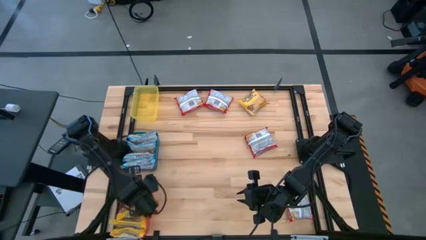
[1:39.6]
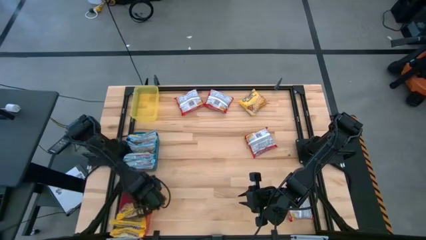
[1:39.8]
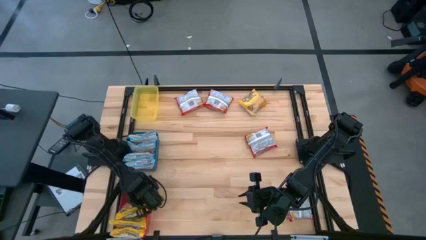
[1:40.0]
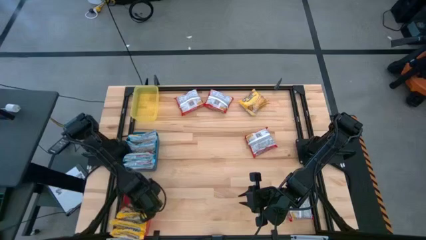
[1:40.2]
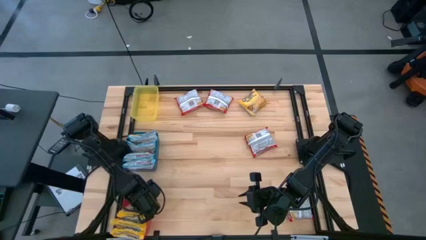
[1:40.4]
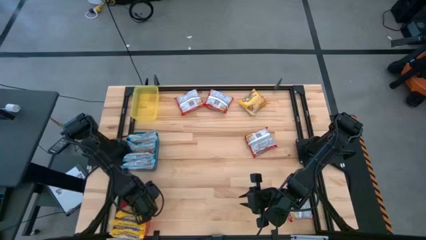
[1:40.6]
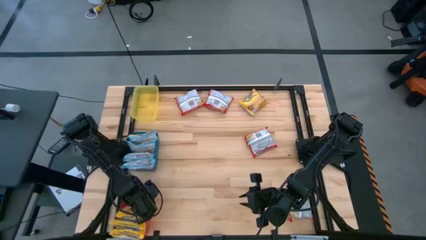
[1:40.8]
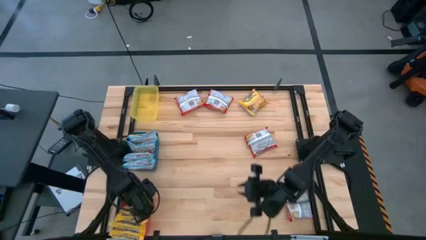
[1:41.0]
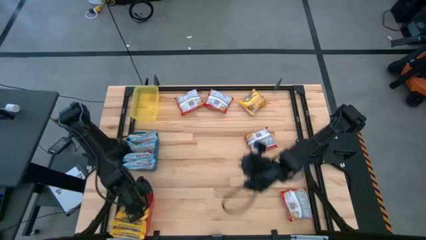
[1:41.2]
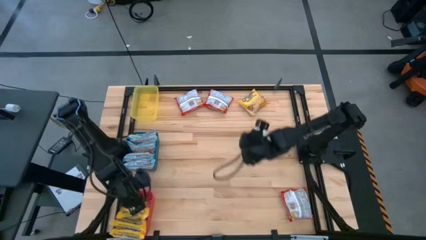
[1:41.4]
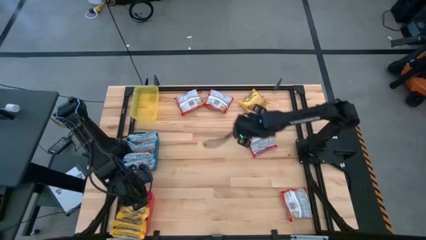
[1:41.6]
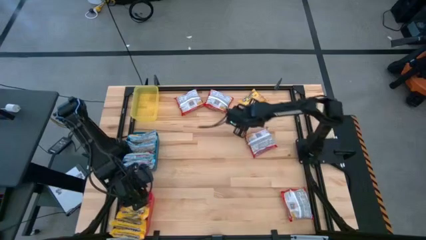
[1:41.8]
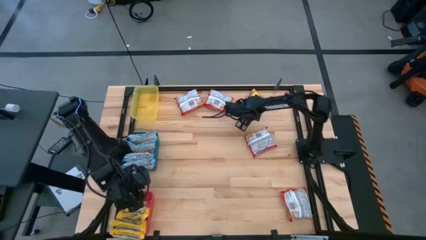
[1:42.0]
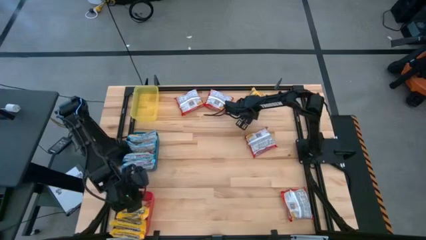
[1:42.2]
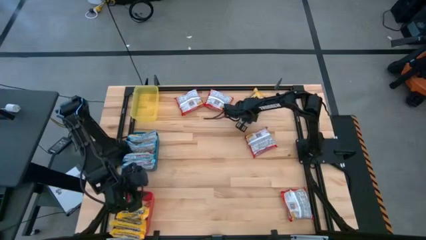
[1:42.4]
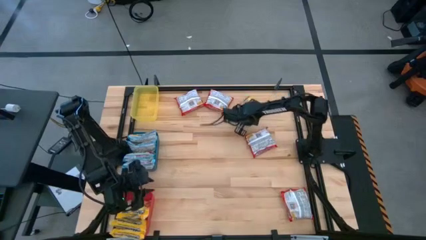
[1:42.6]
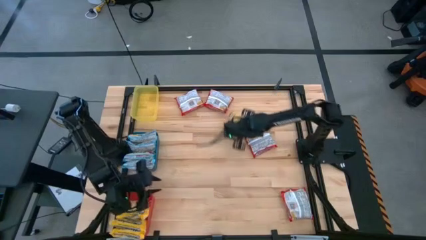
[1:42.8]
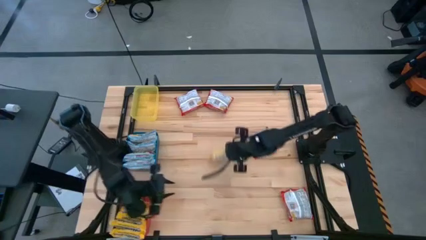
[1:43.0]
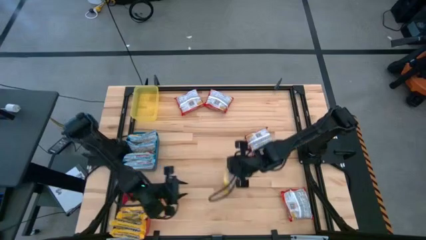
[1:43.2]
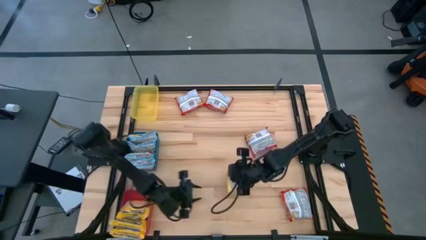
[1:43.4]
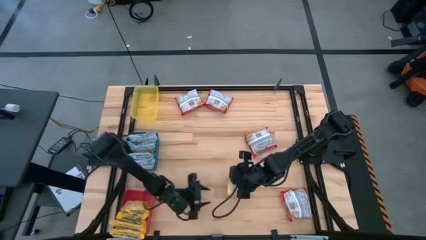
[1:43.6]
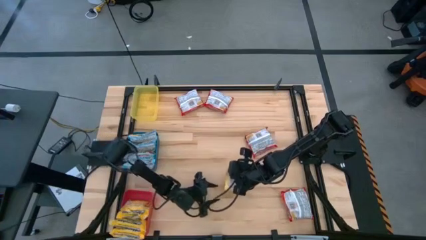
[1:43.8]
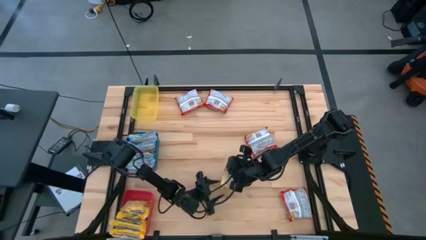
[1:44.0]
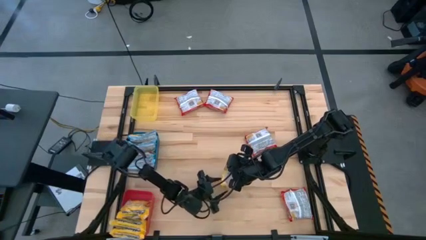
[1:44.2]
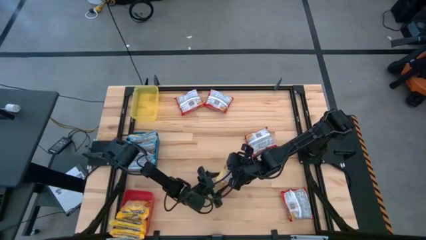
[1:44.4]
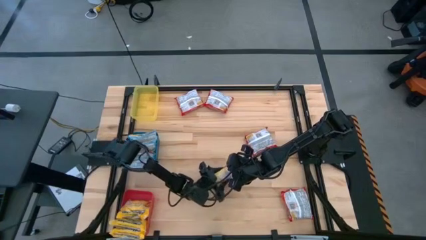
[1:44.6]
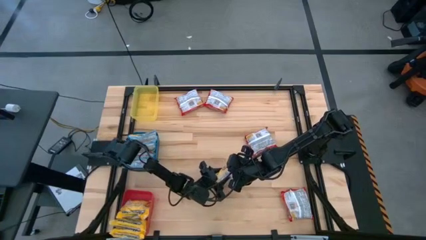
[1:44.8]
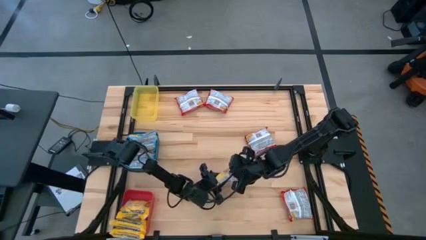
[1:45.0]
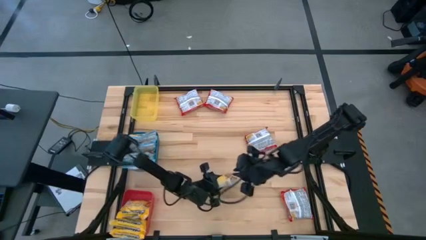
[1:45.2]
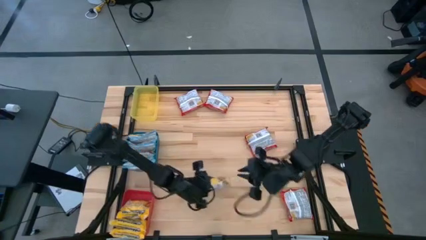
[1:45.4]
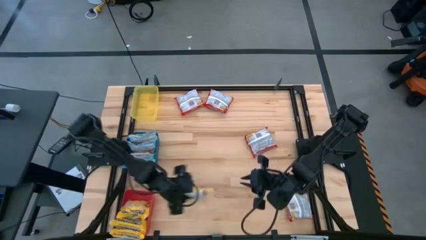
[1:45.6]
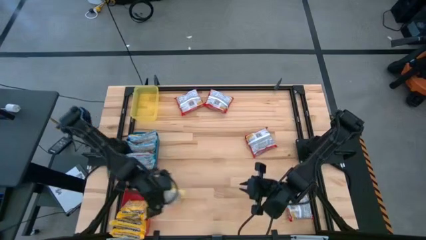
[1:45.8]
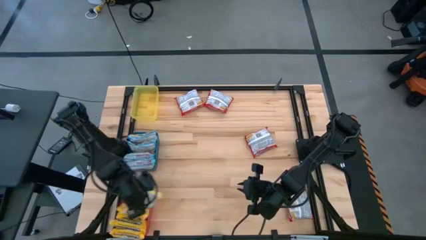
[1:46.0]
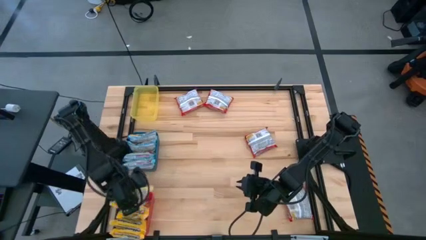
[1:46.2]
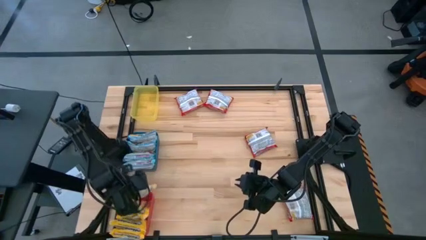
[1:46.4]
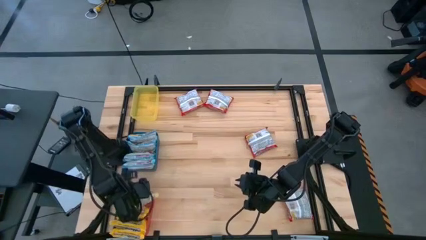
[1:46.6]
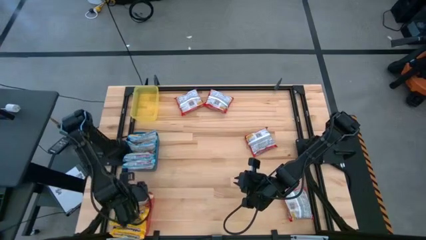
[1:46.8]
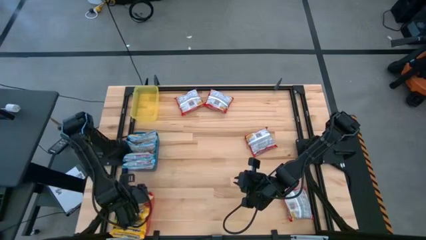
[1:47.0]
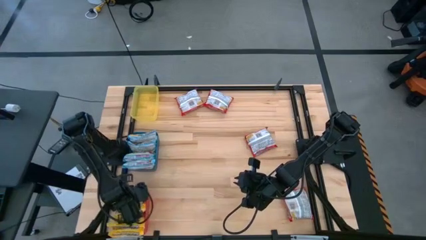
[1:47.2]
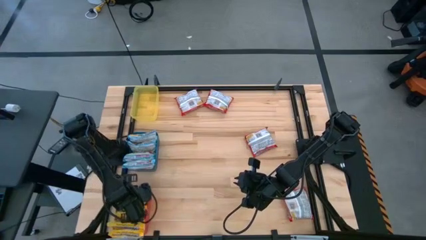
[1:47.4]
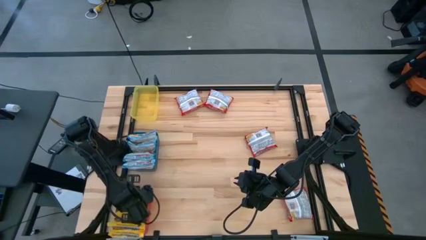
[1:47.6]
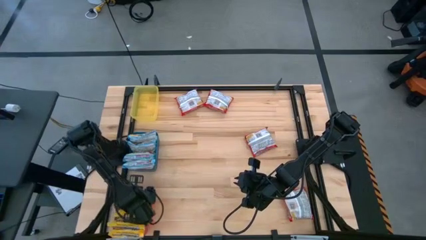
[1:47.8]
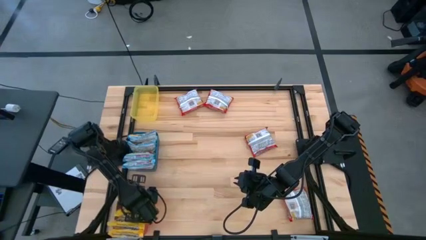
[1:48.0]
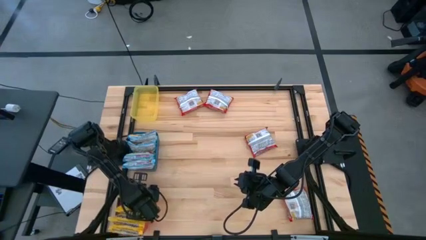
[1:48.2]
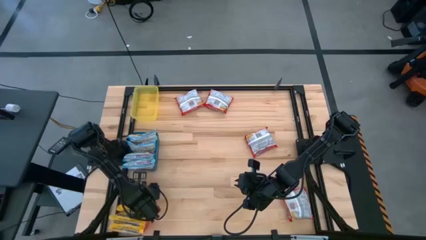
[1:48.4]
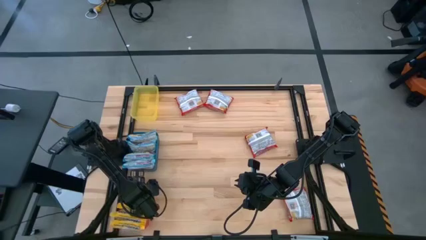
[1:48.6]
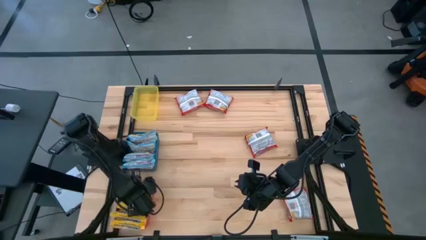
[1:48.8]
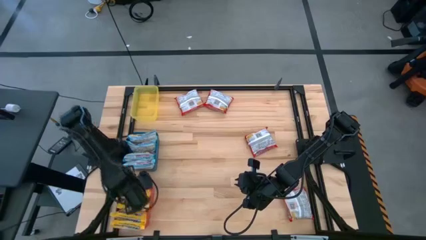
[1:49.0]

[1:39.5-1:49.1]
Task: Sort Maruchan noodles
Put the yellow noodle pack into the red bin

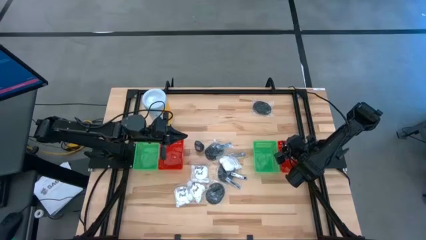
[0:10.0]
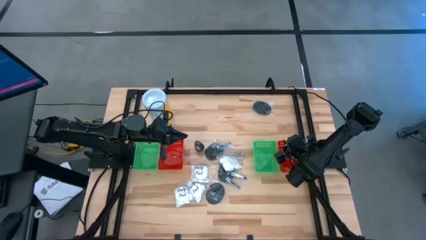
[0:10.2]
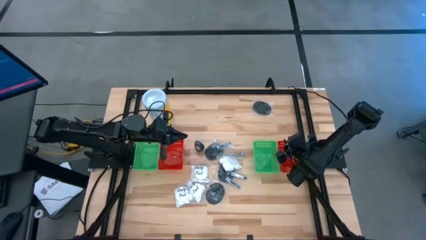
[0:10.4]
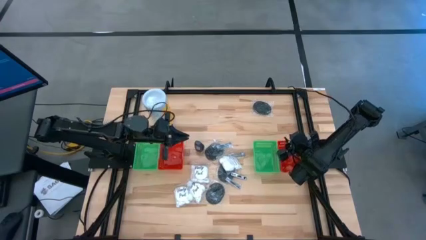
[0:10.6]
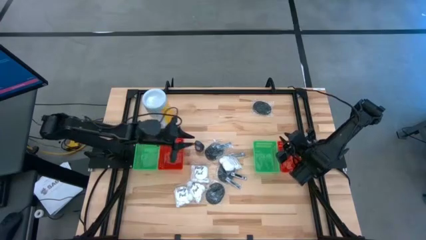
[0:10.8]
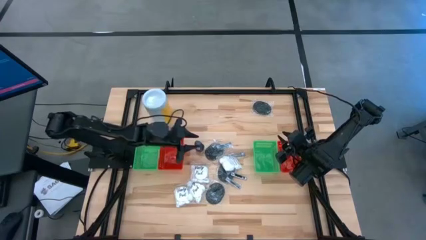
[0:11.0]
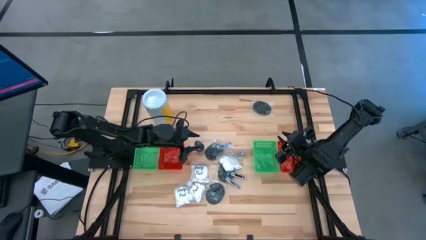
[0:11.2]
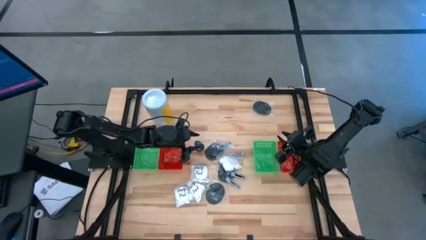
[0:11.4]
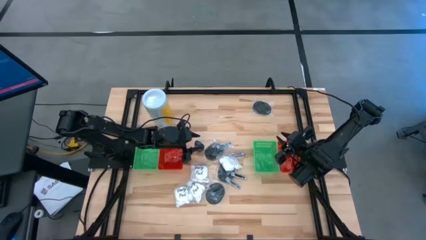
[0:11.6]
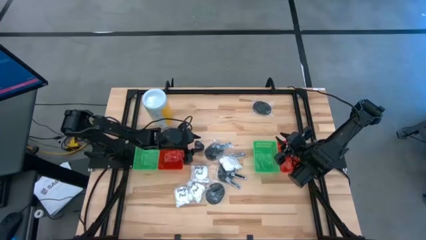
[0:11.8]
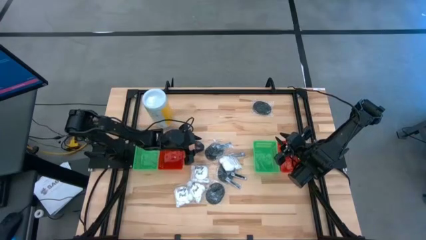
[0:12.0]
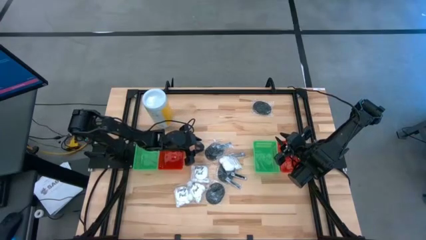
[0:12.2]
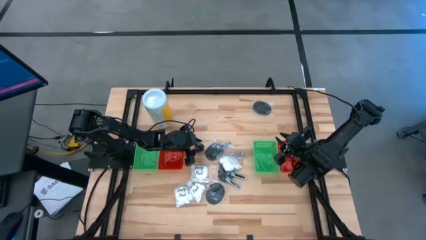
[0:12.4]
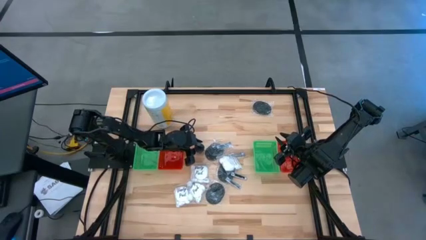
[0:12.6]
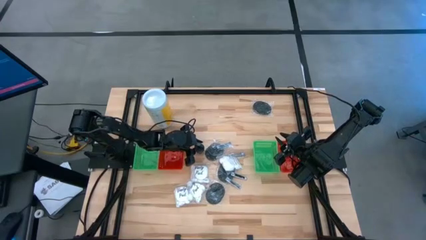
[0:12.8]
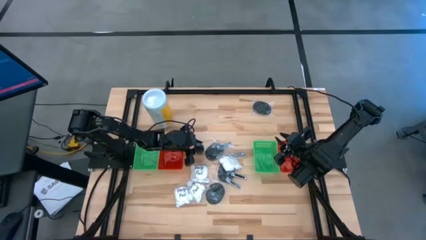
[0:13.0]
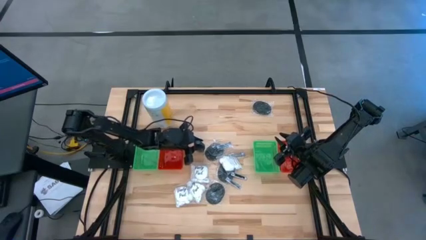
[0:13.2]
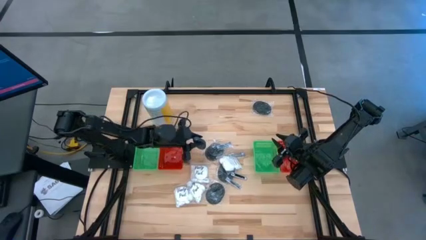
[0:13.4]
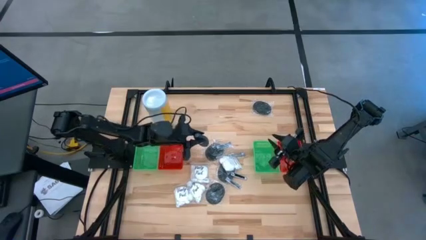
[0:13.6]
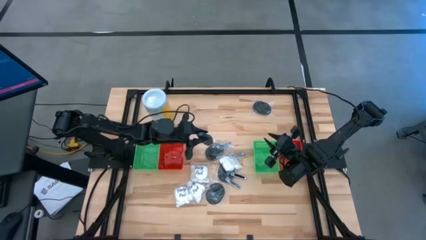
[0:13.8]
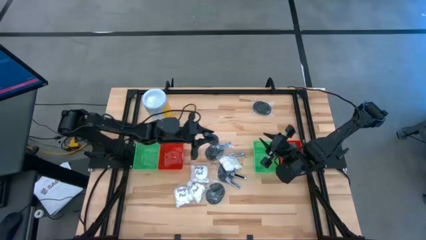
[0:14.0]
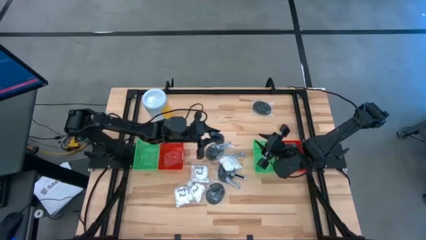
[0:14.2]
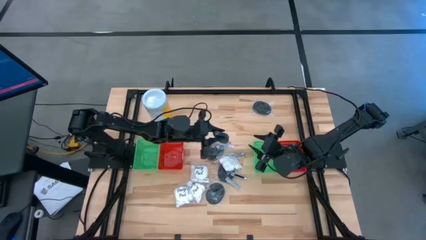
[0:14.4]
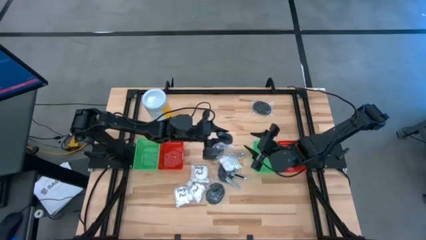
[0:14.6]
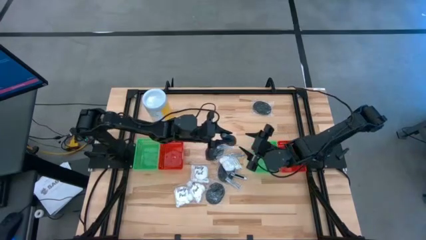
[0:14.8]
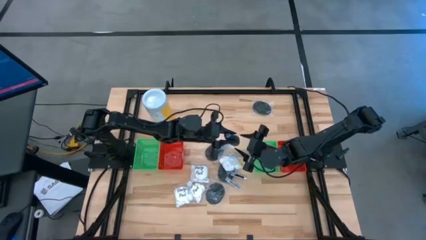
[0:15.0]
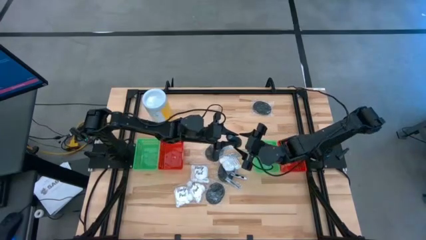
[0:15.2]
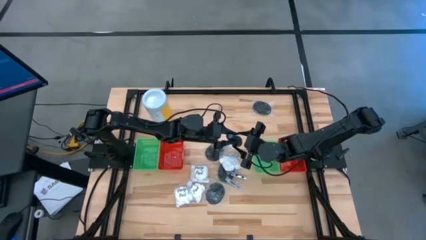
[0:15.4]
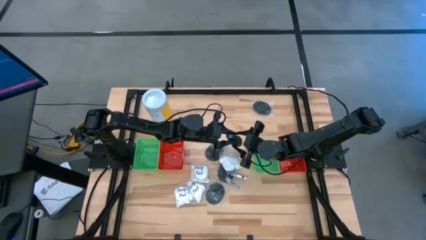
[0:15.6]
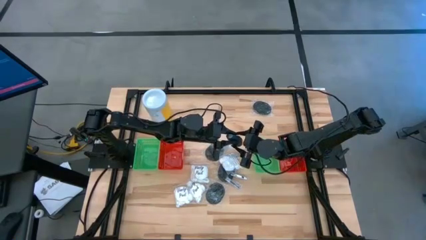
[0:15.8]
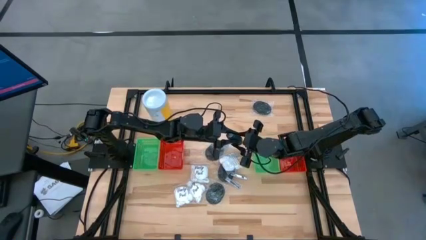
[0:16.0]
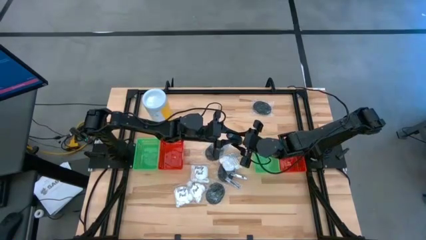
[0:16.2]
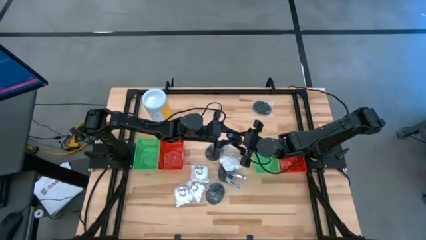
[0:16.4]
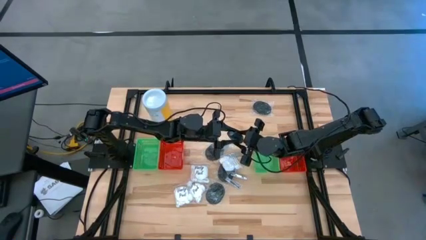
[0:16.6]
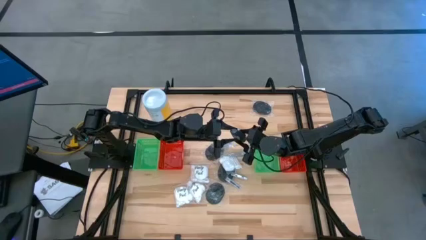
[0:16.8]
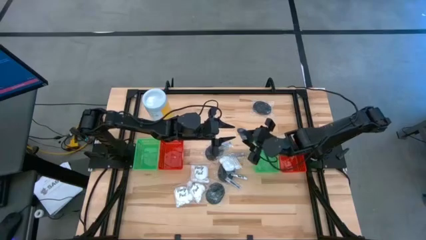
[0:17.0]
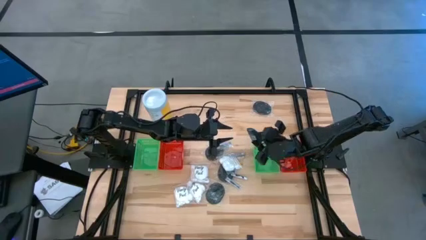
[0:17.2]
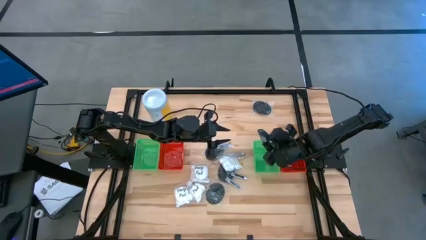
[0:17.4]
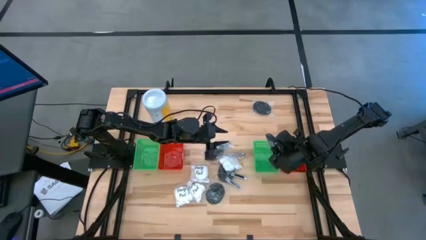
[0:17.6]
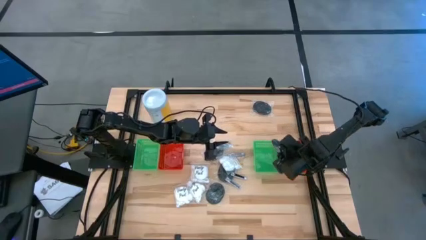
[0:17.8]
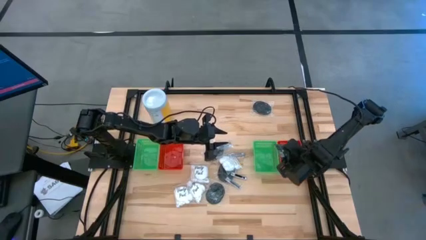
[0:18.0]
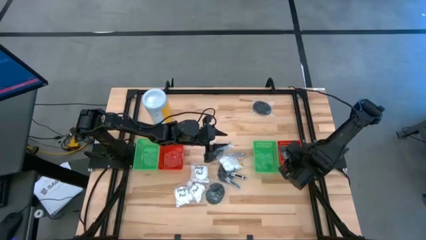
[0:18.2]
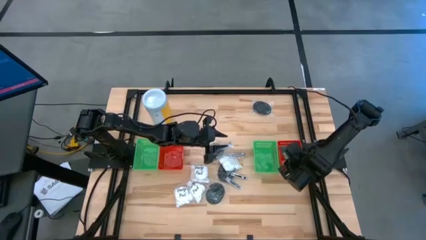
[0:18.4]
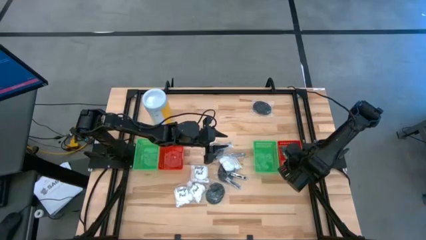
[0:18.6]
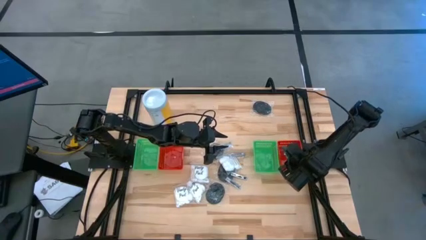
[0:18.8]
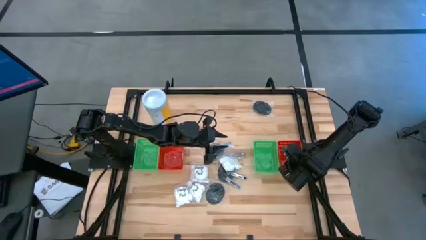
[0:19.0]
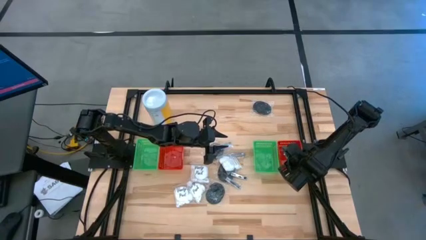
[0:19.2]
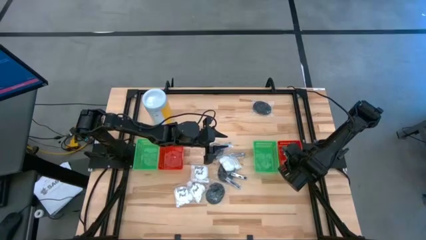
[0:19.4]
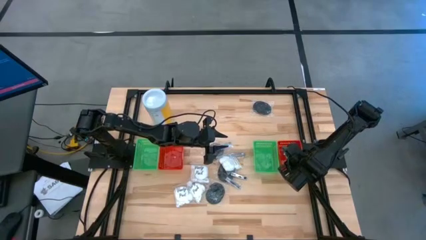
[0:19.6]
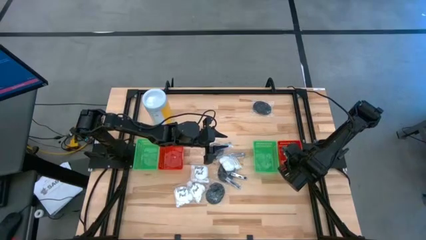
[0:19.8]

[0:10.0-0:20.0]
Task: Pick & Place Travel size toiletries
Put the gray deodorant into the right red bin
